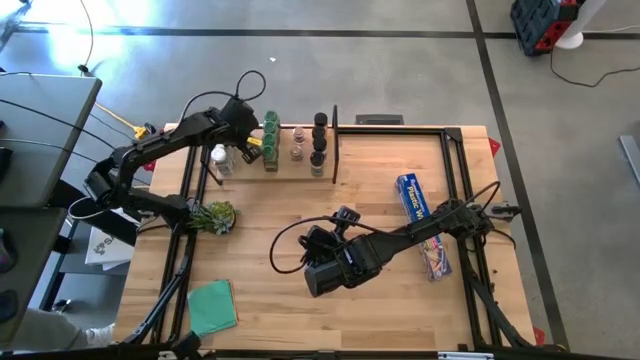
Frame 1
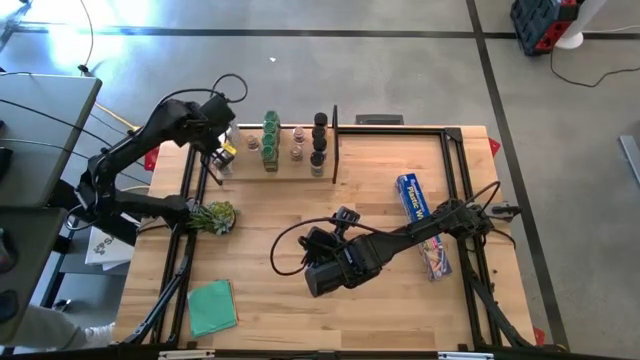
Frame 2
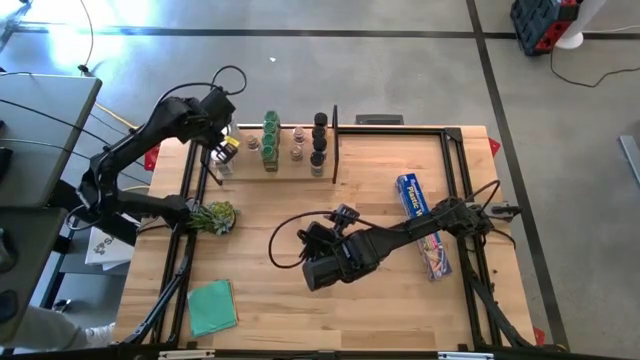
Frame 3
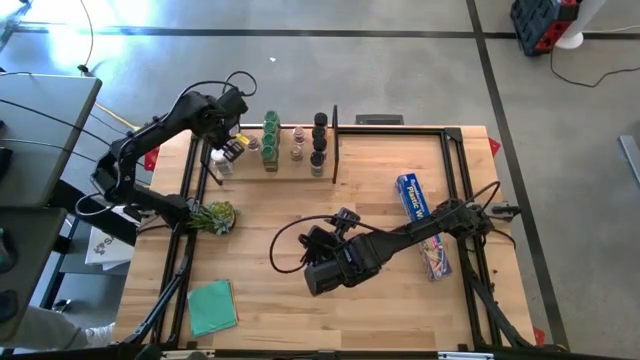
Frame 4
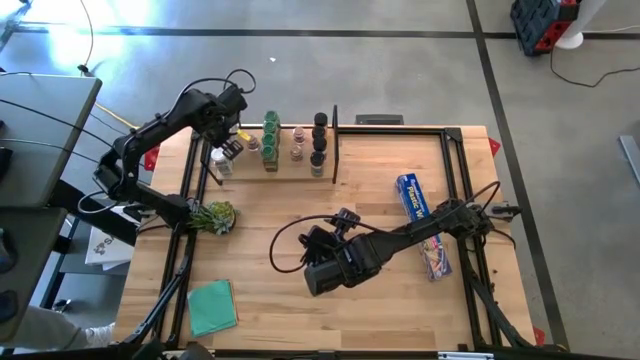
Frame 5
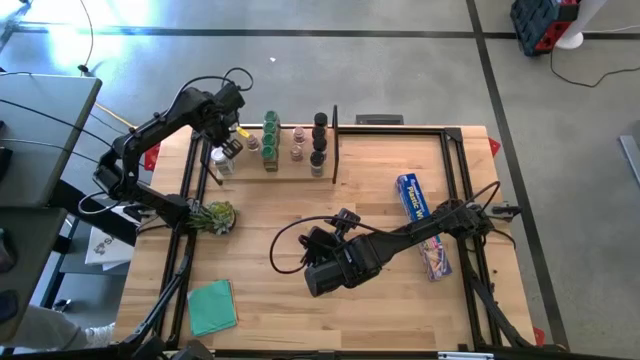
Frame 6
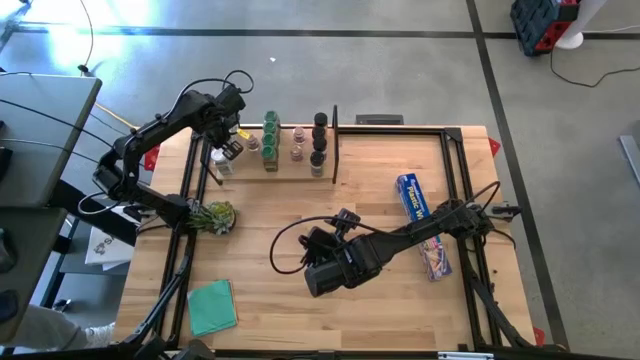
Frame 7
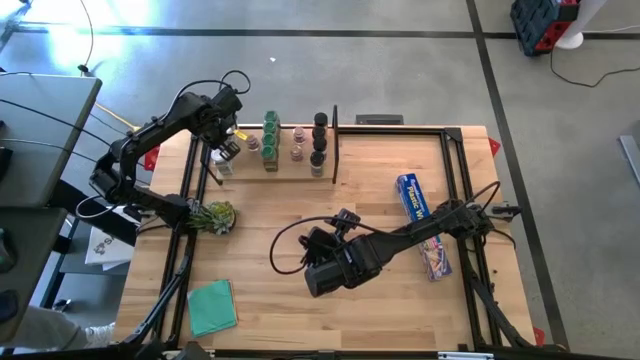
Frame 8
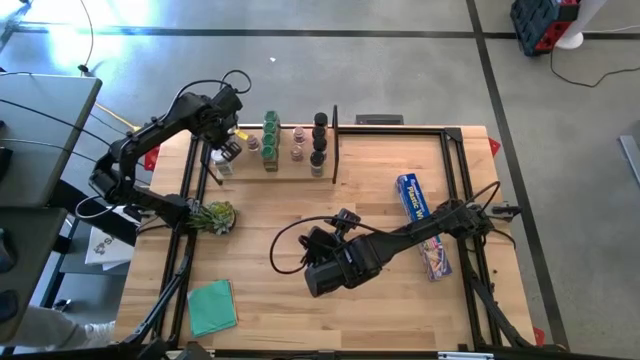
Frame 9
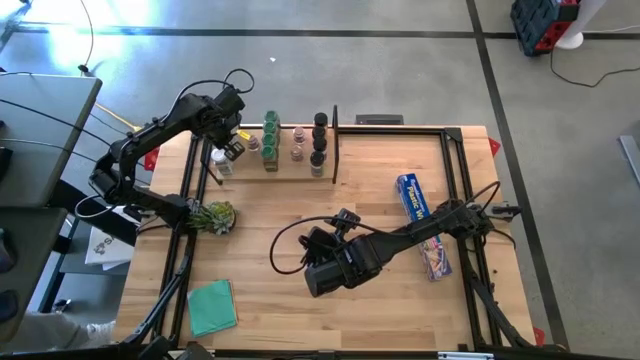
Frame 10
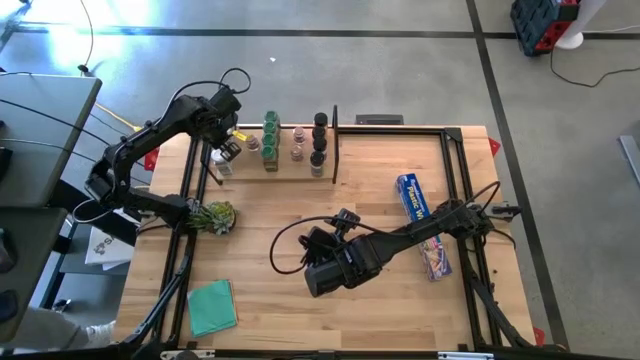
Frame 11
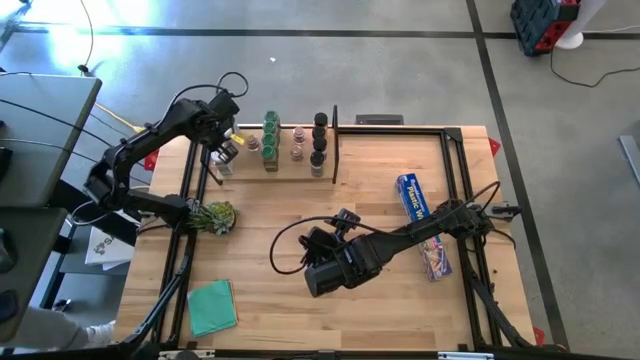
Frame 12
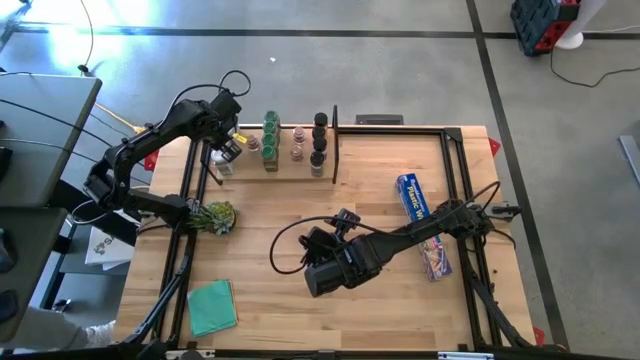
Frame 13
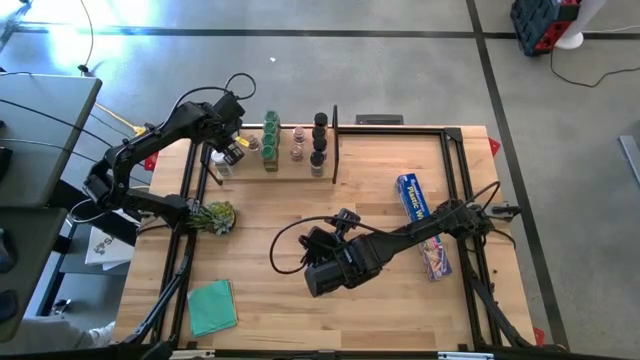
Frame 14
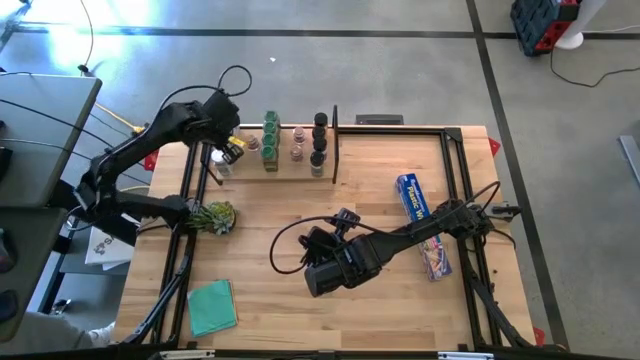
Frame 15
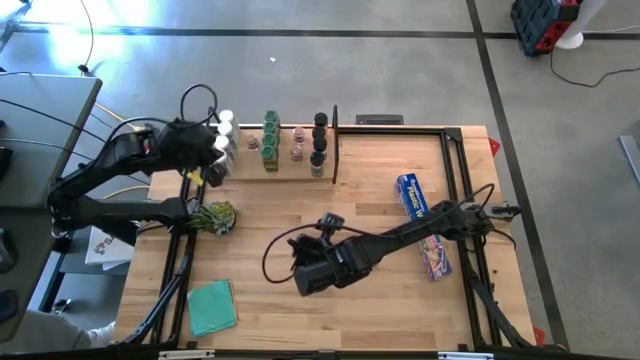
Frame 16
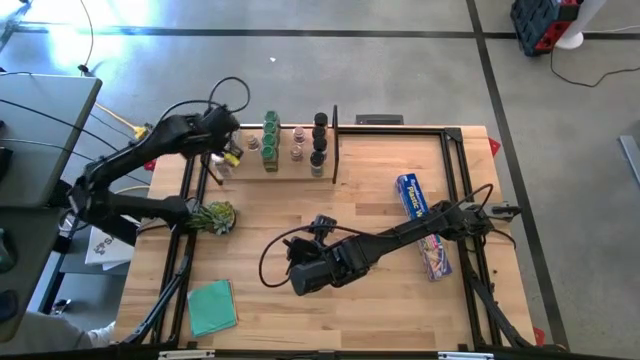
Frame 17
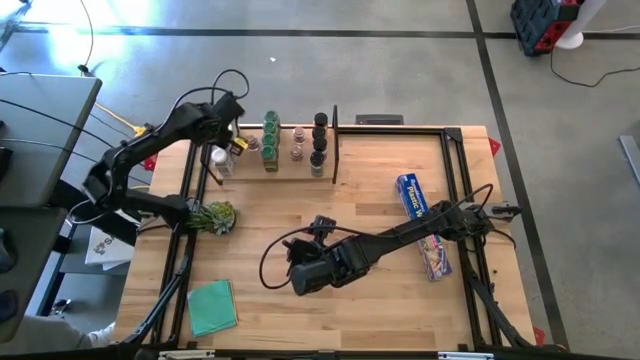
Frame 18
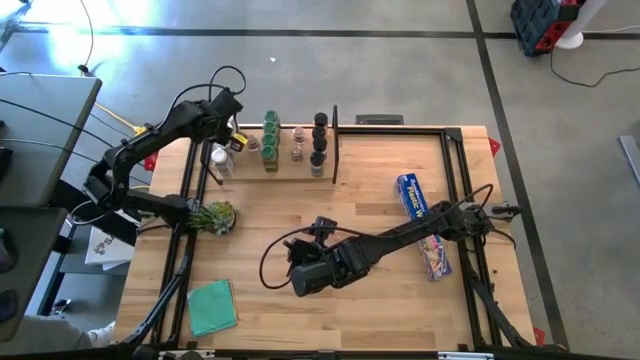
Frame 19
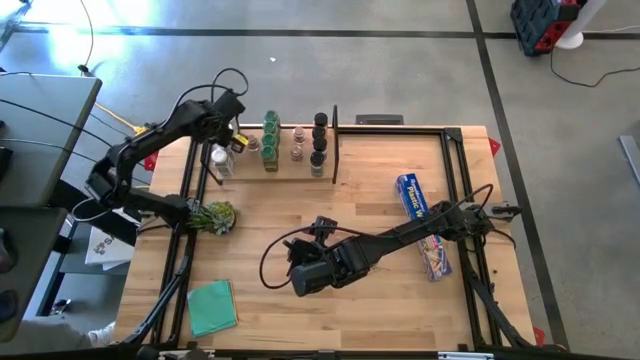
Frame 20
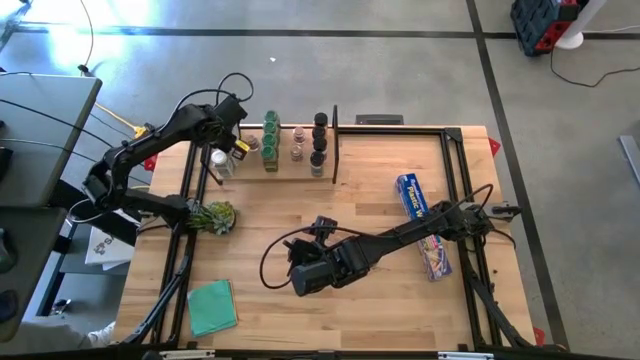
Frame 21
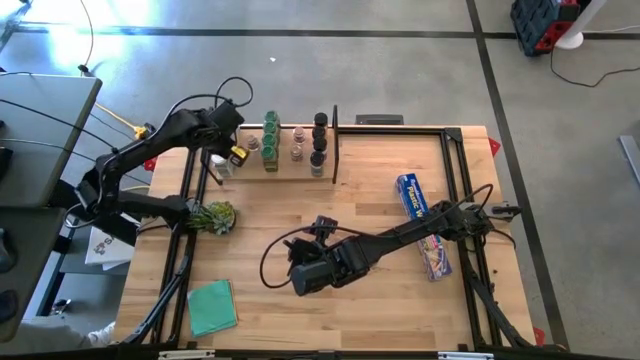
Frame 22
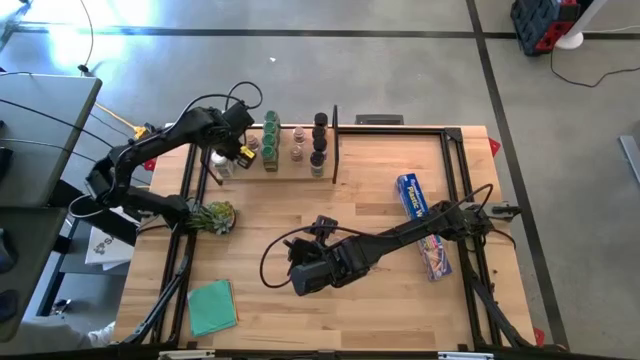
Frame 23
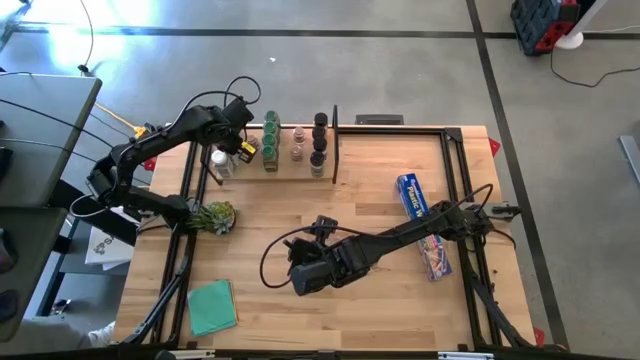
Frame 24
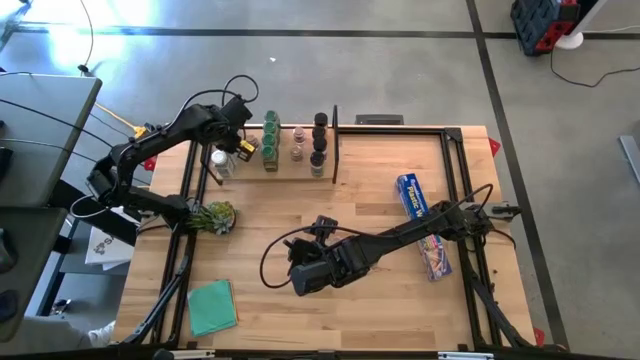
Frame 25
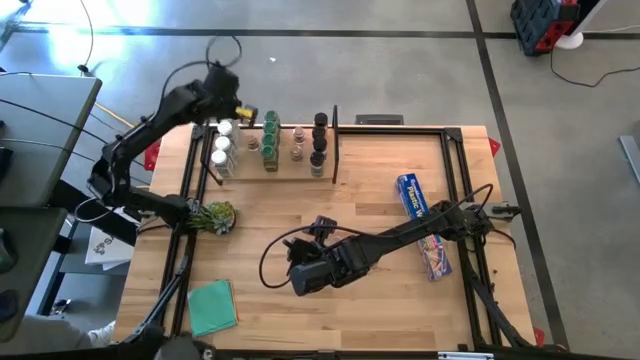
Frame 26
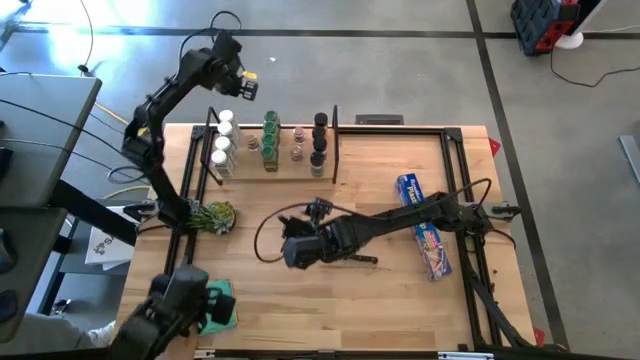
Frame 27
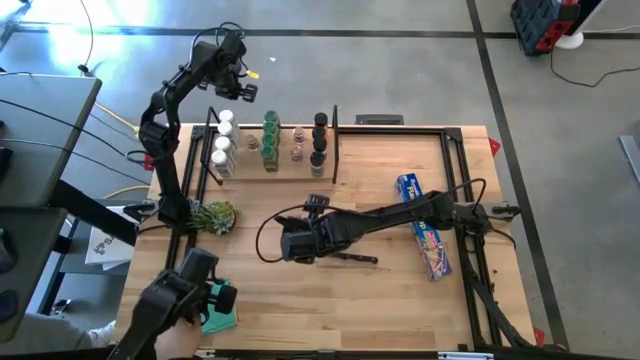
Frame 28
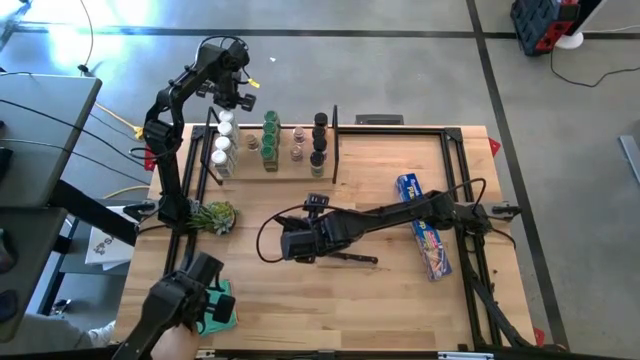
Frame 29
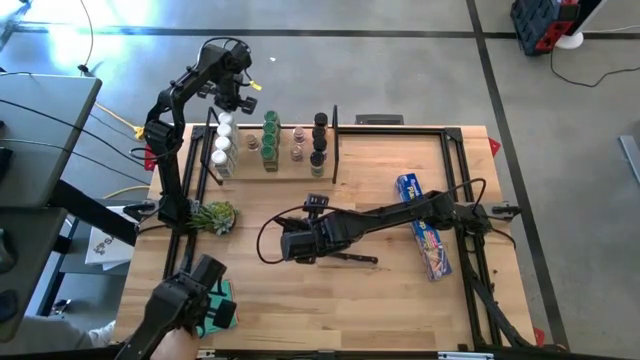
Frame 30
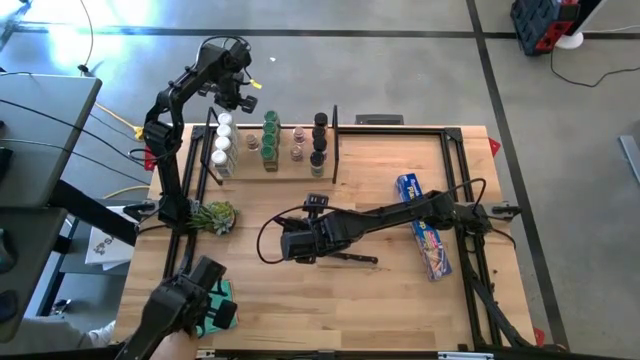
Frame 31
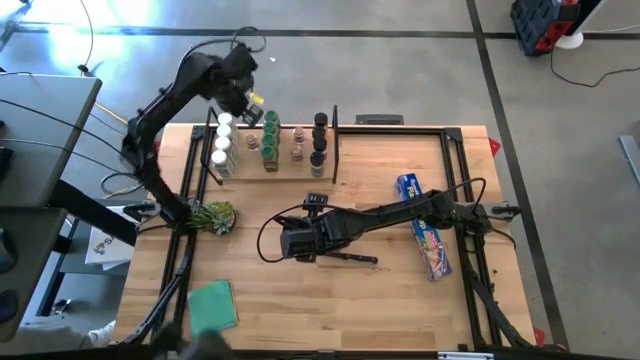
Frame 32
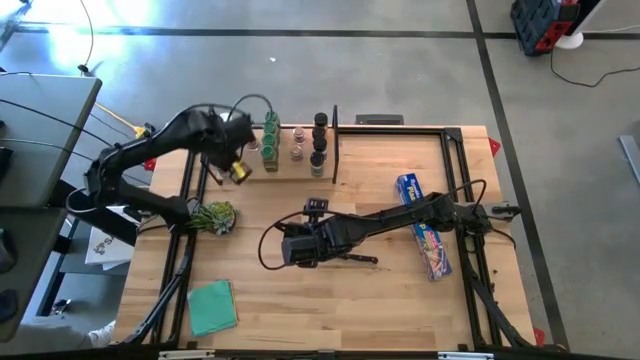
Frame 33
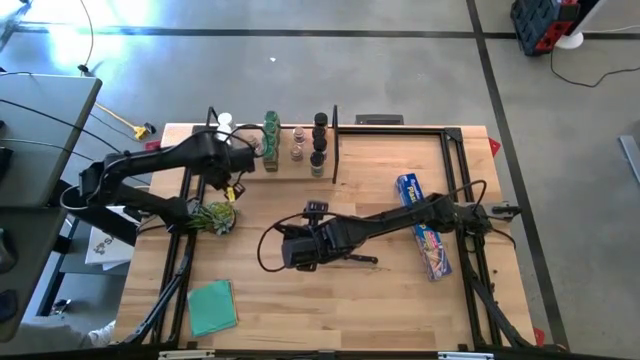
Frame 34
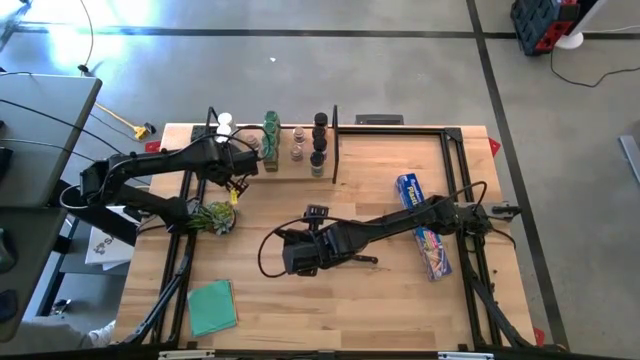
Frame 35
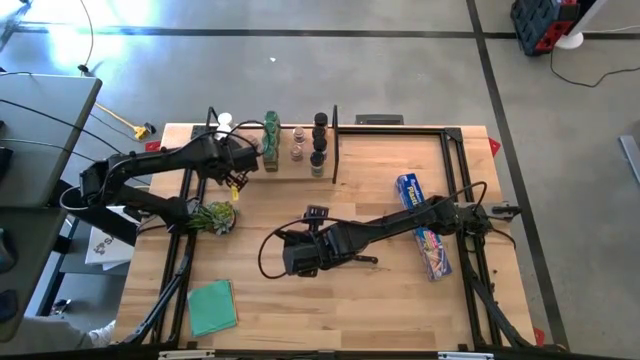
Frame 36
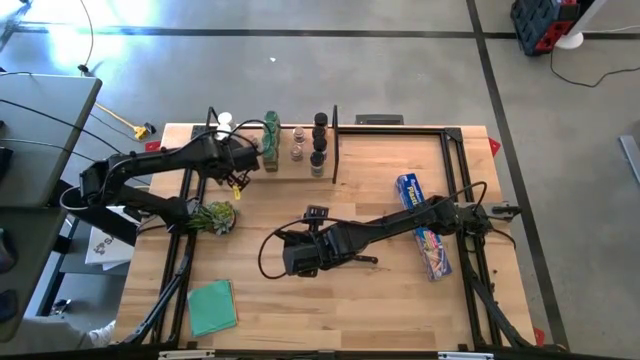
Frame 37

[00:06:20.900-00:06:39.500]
Task: Shelf spices
Adjust the white lid seasoning bottles on the shelf

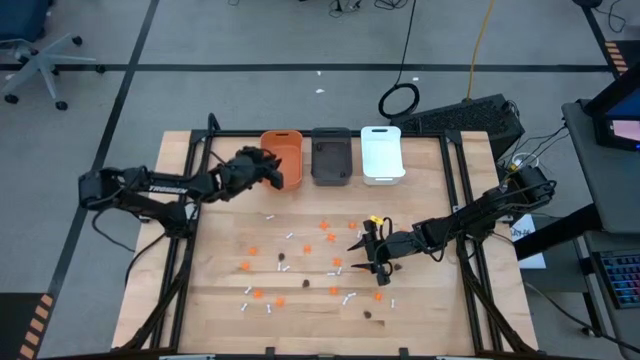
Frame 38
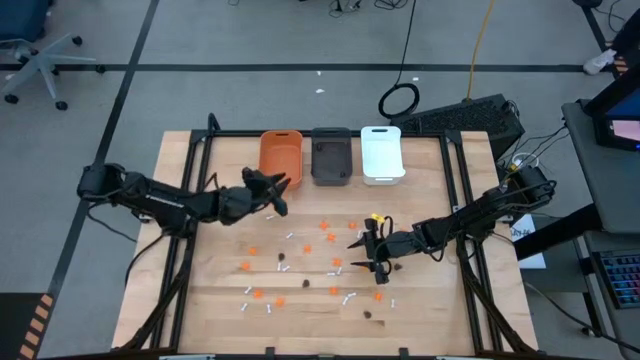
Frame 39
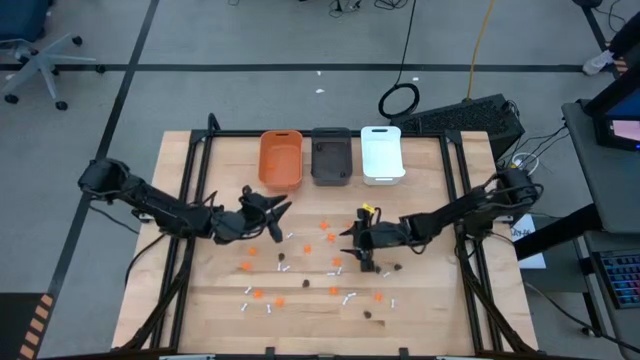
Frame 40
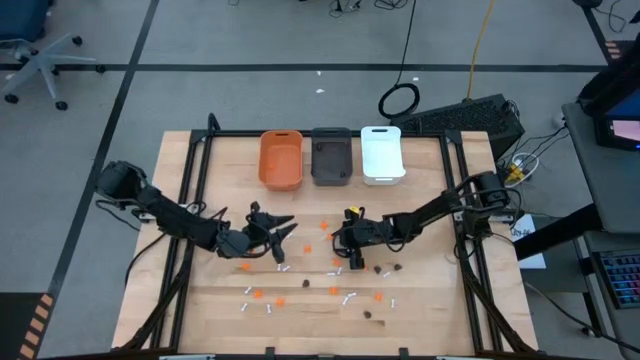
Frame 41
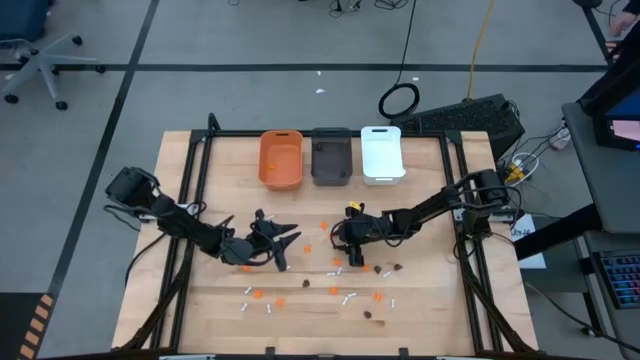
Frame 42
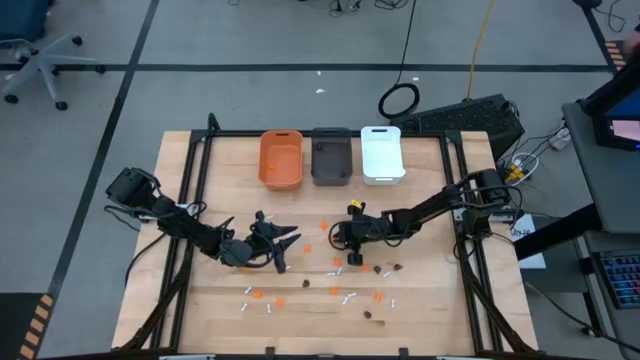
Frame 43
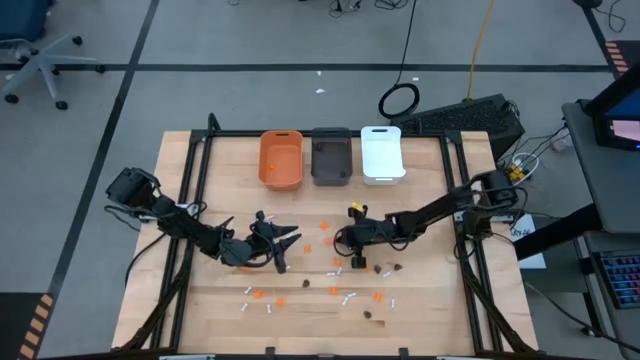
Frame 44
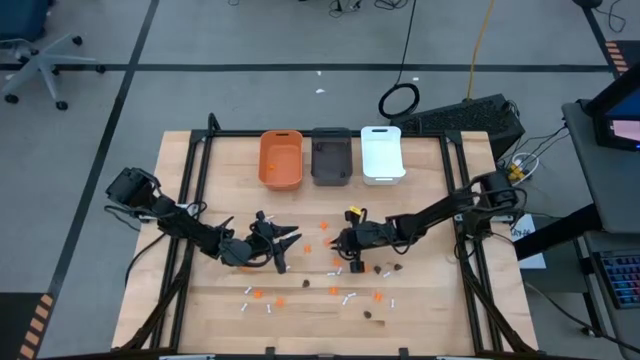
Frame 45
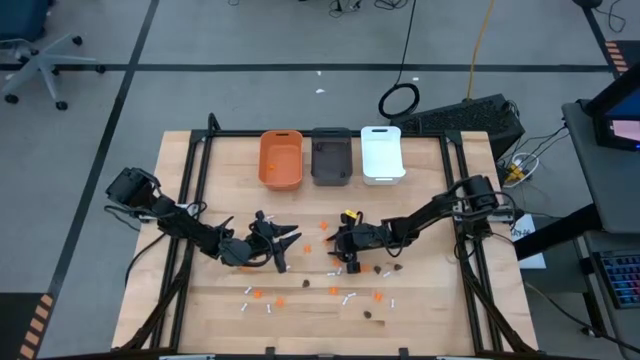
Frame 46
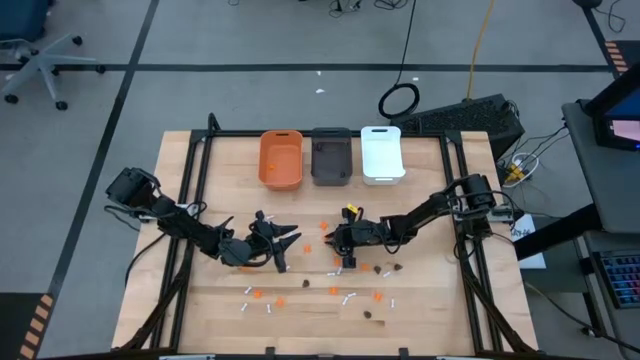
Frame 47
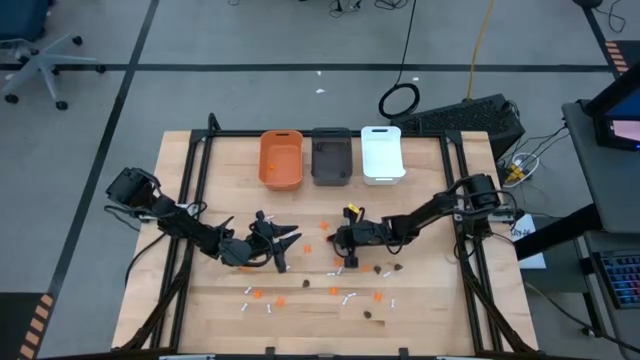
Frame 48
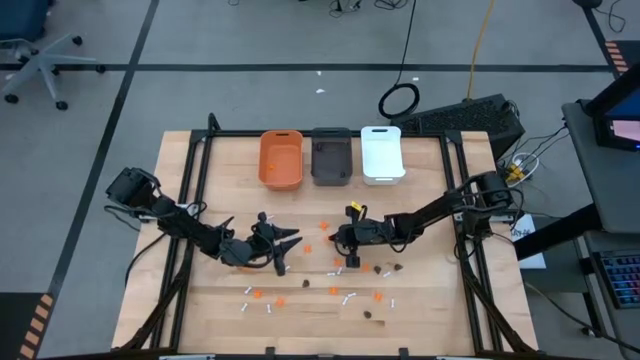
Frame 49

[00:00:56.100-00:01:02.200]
Task: Sort Halloween decoration
Put the orange spider toy into the orange bin
